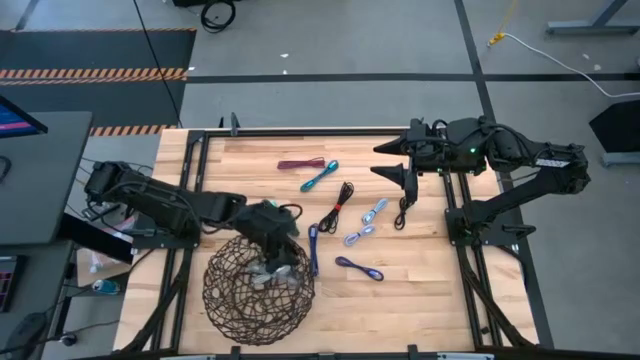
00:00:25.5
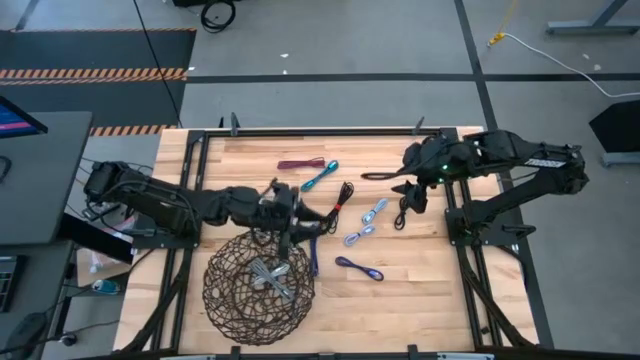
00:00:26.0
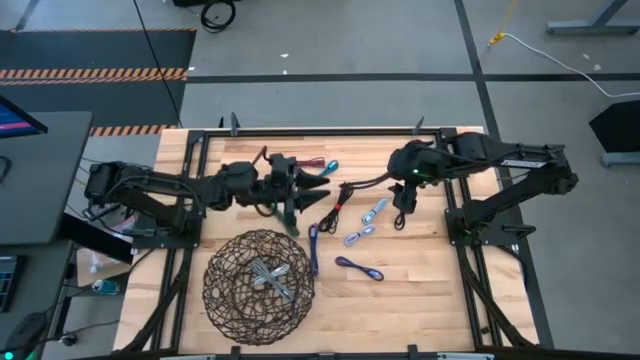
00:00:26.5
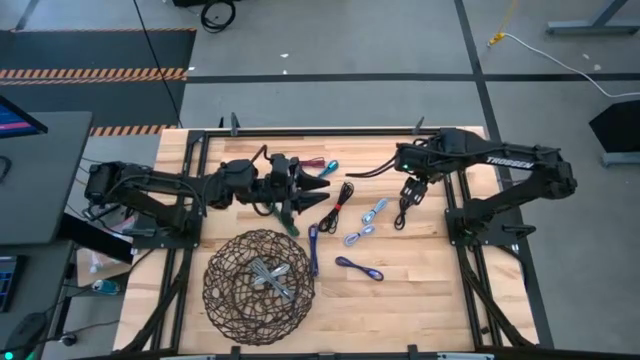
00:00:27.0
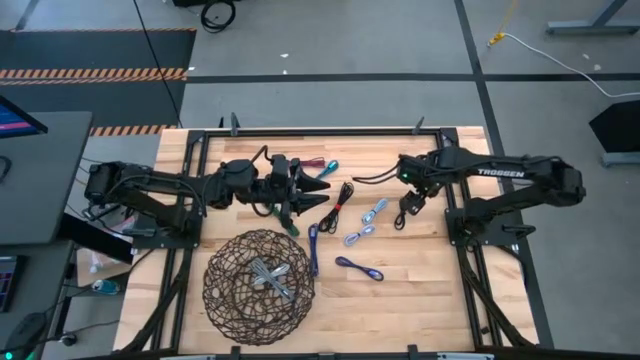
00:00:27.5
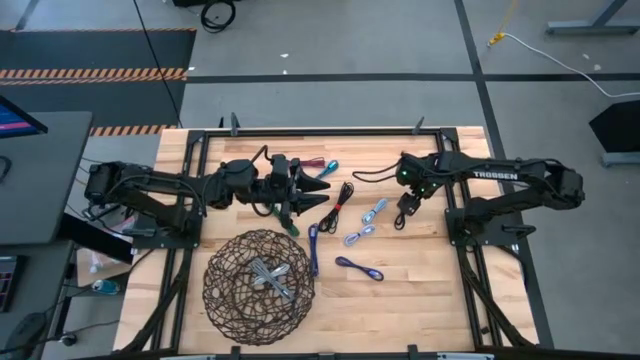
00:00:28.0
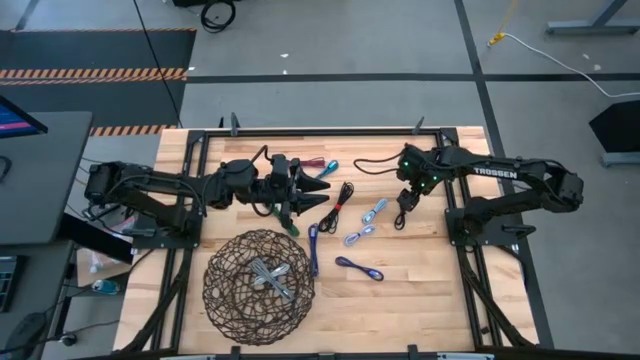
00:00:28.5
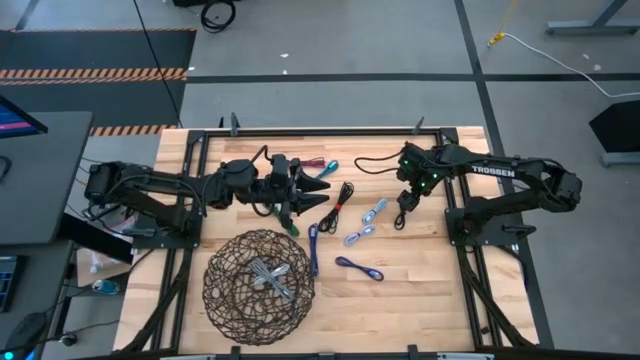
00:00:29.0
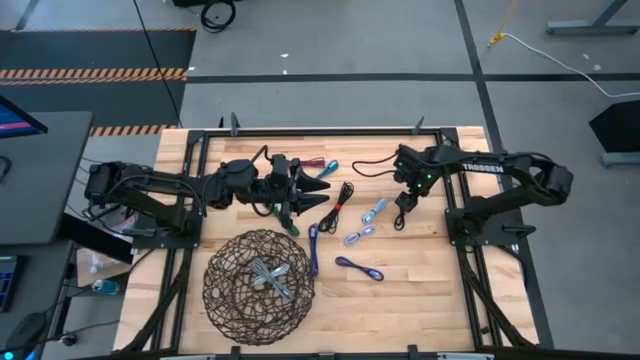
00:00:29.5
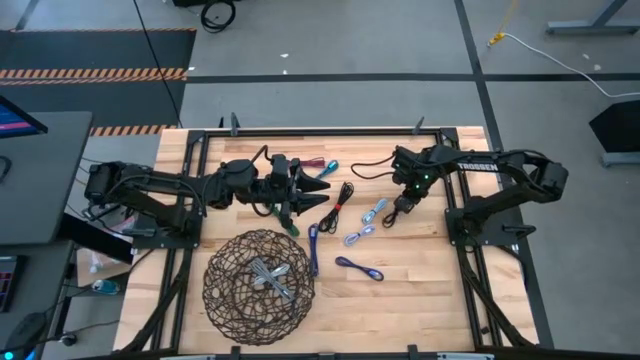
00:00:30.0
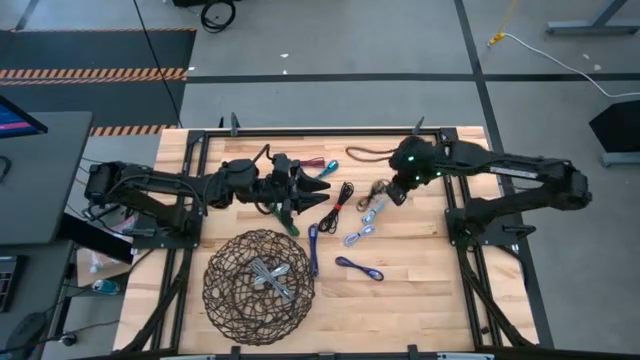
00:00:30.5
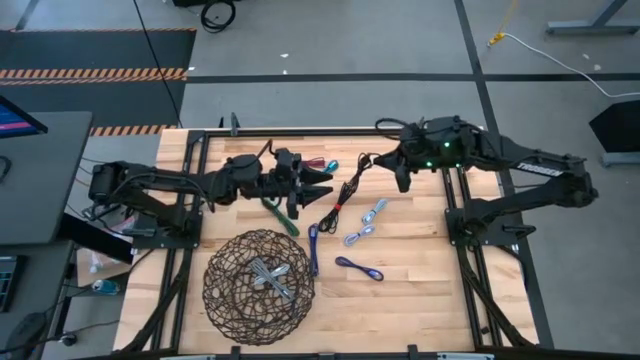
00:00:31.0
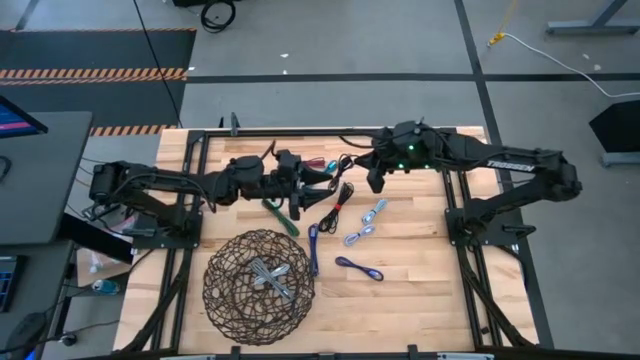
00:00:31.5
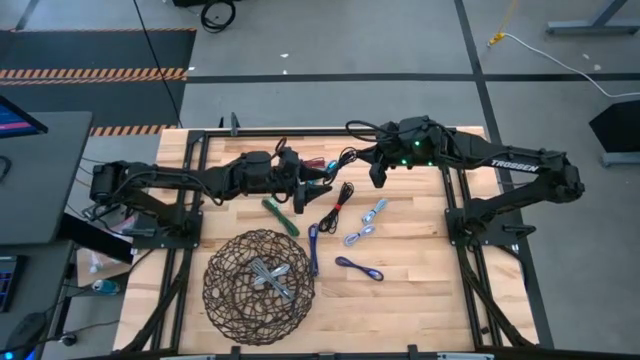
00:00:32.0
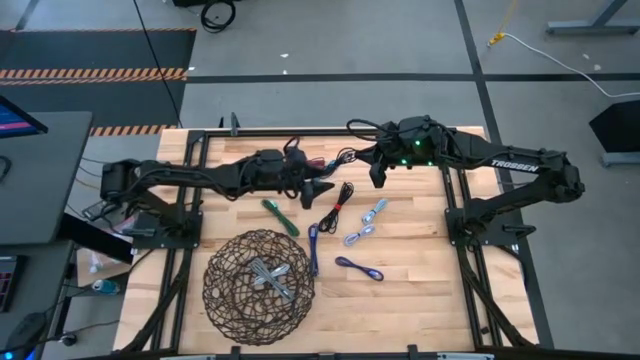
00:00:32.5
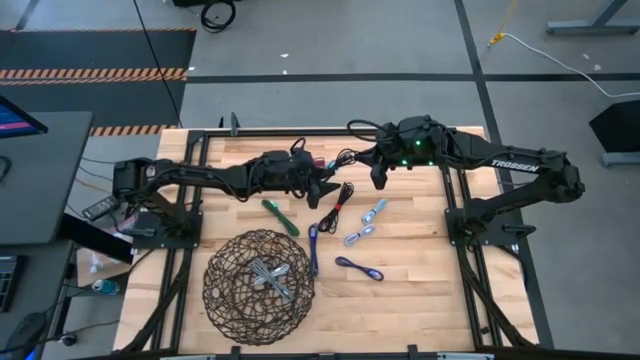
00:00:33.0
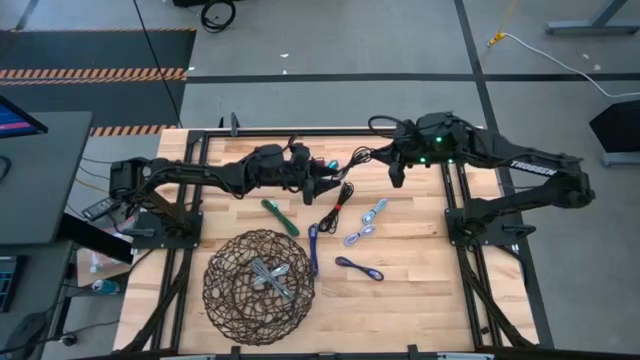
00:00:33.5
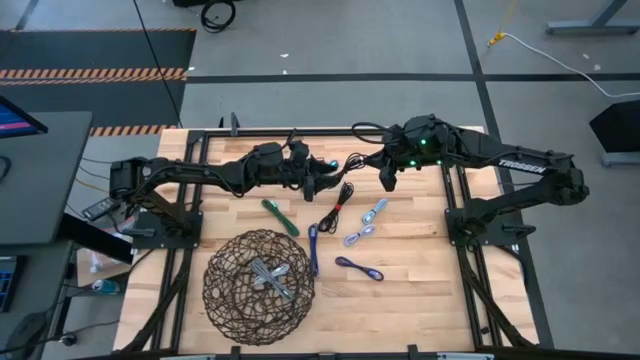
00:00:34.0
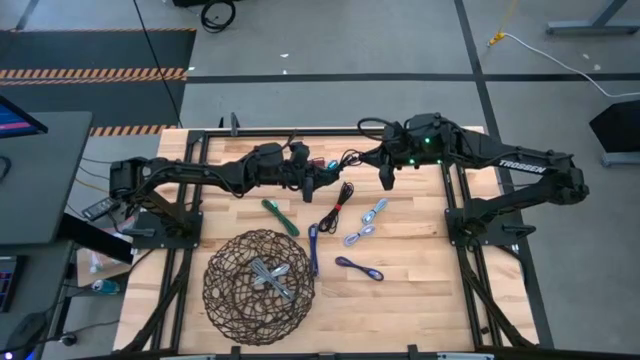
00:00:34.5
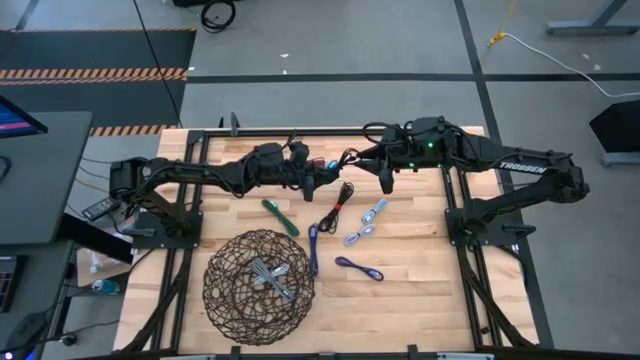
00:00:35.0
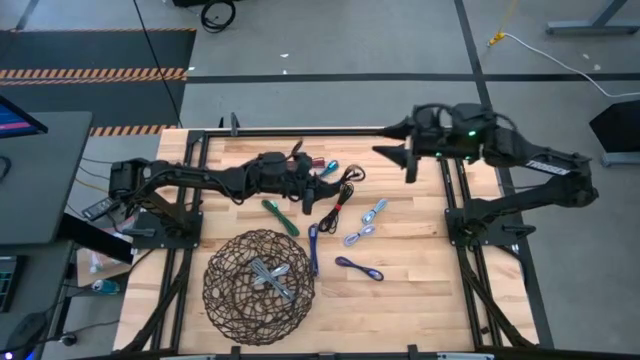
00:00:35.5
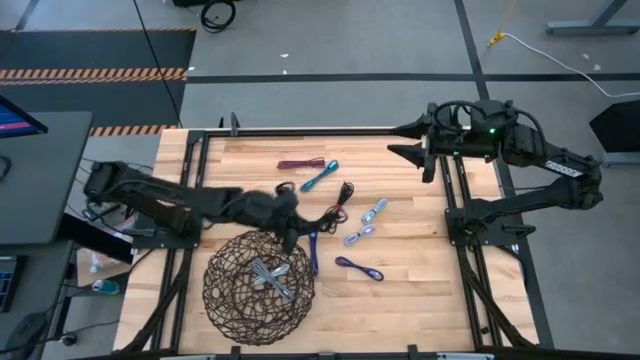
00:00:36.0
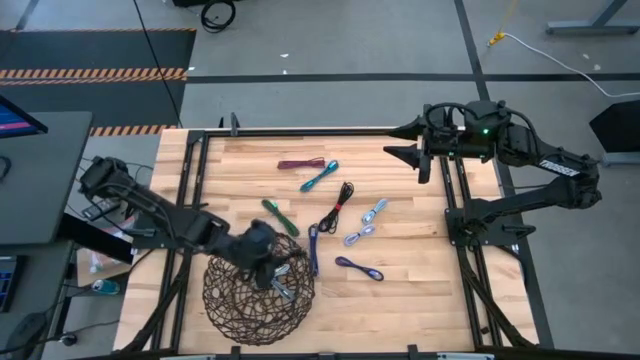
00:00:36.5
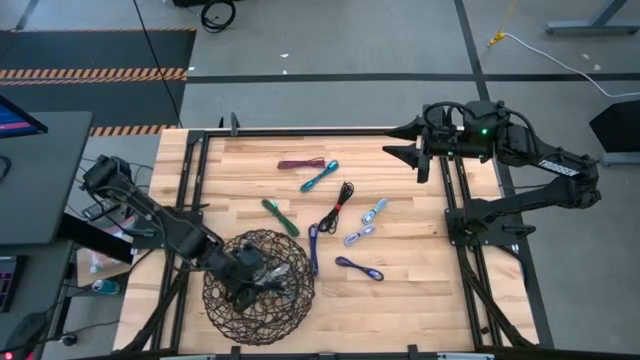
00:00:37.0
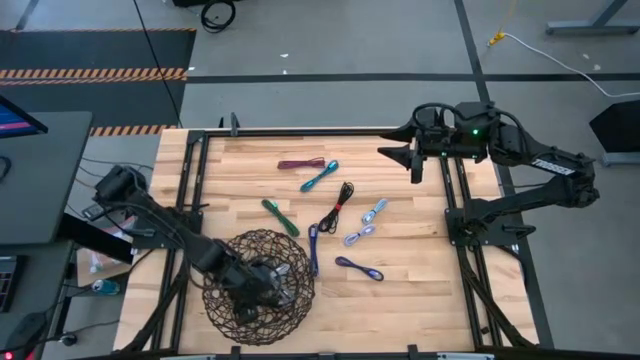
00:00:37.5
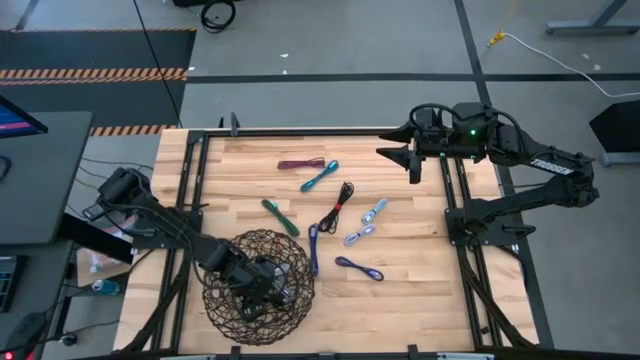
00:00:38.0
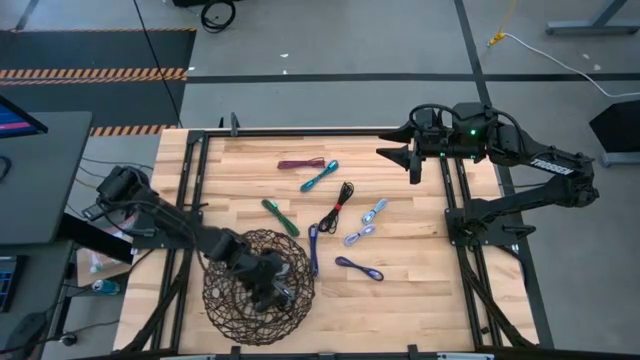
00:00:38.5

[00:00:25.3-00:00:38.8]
Task: Pick and place USB-C Cables
Put the right black charger cable into the wire basket

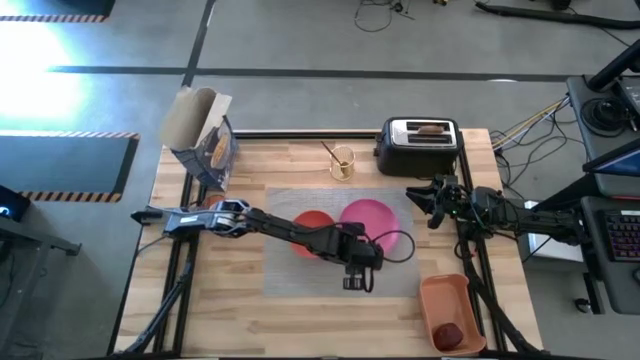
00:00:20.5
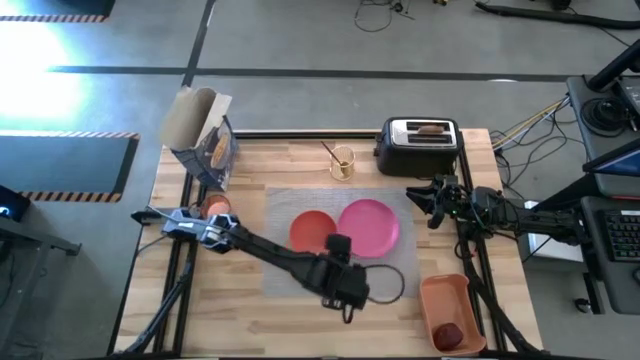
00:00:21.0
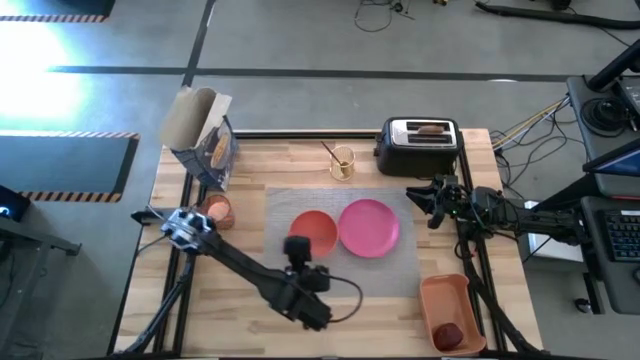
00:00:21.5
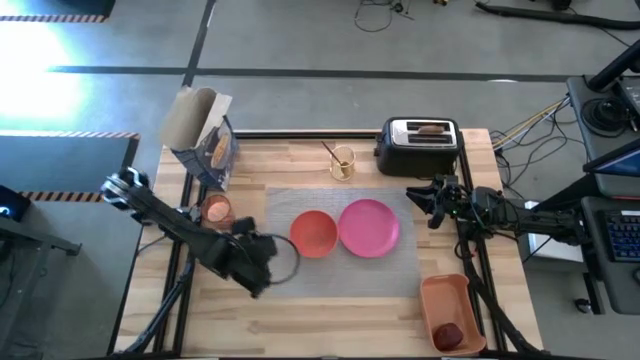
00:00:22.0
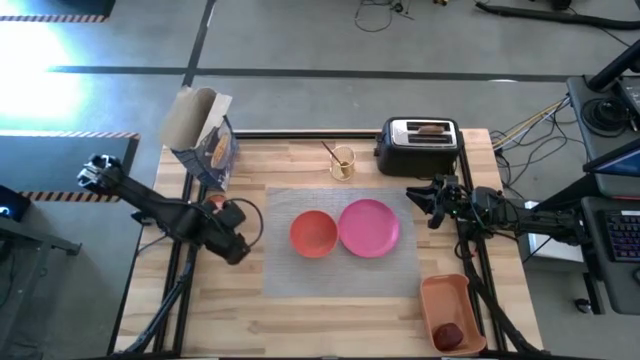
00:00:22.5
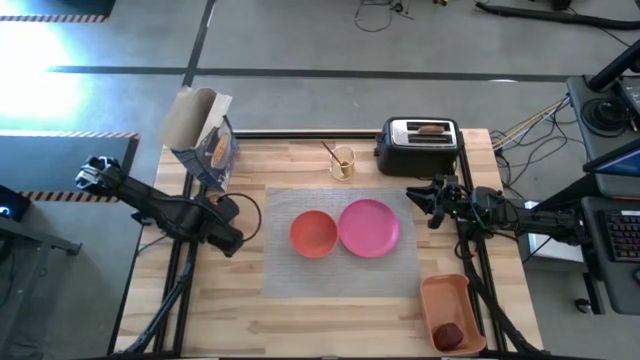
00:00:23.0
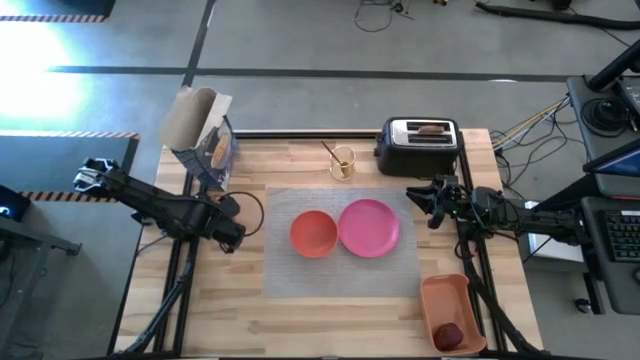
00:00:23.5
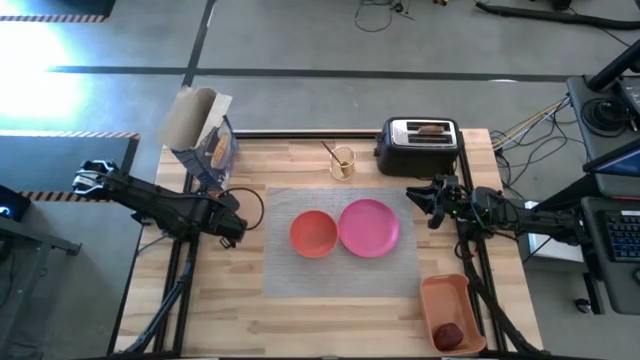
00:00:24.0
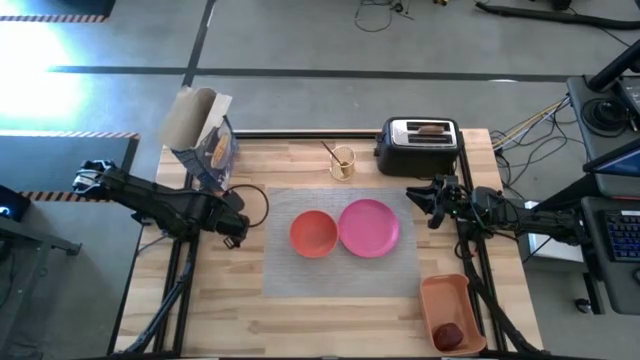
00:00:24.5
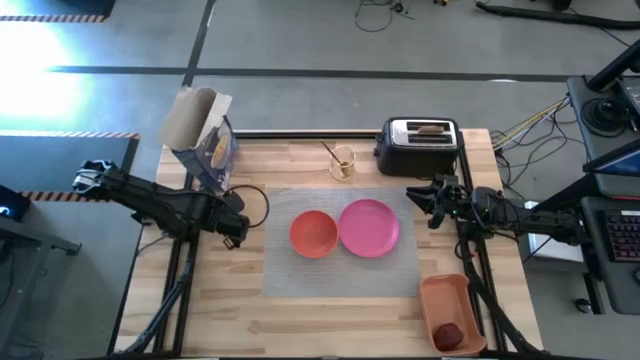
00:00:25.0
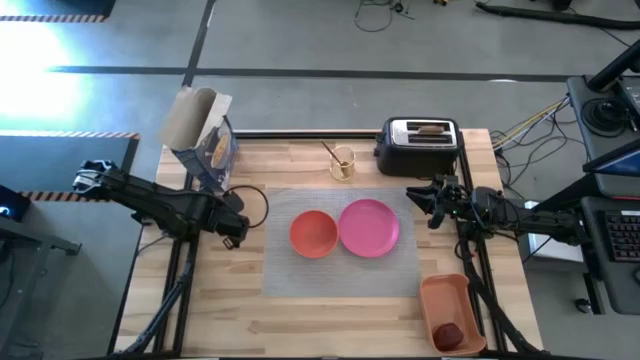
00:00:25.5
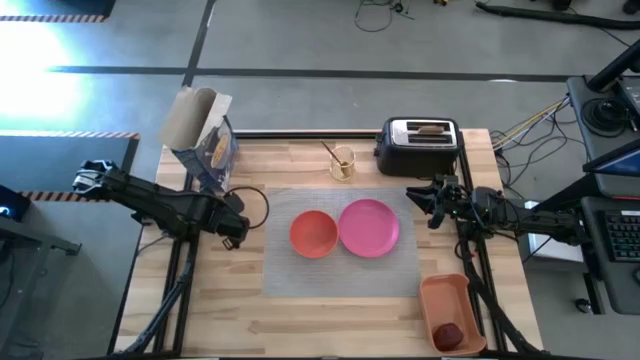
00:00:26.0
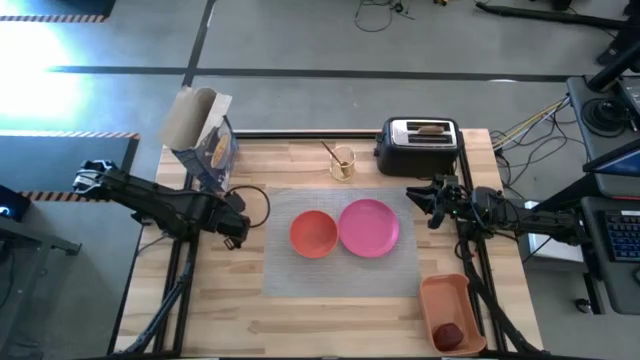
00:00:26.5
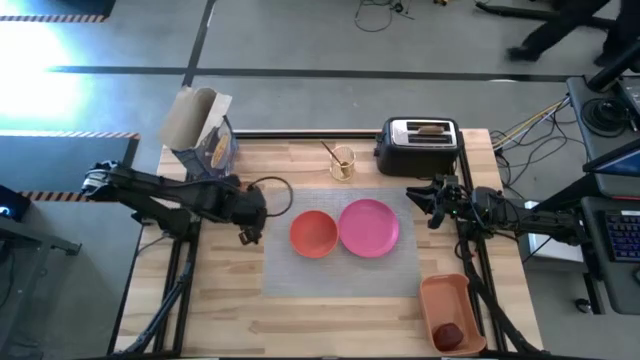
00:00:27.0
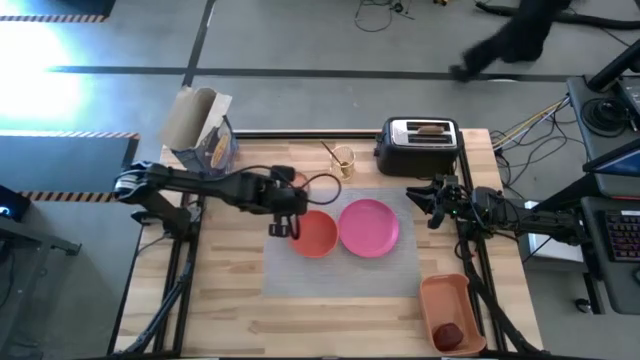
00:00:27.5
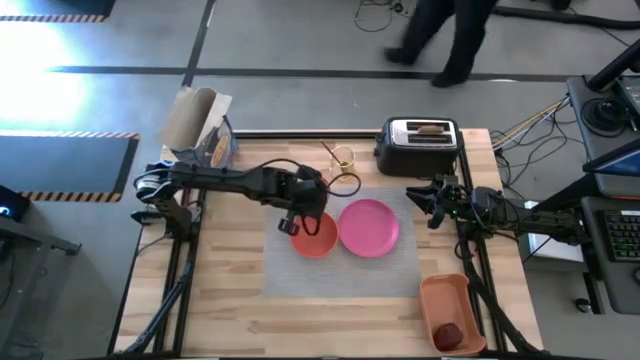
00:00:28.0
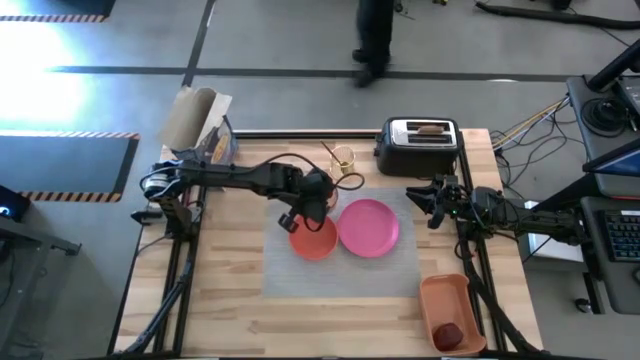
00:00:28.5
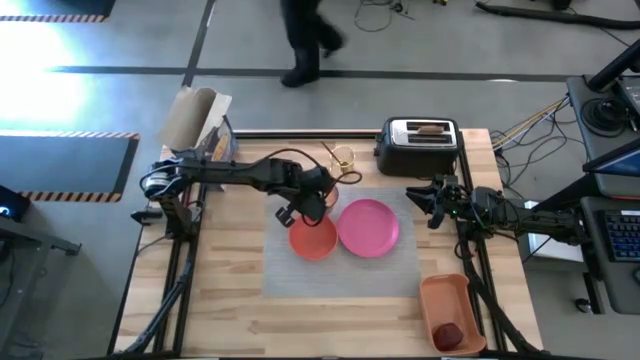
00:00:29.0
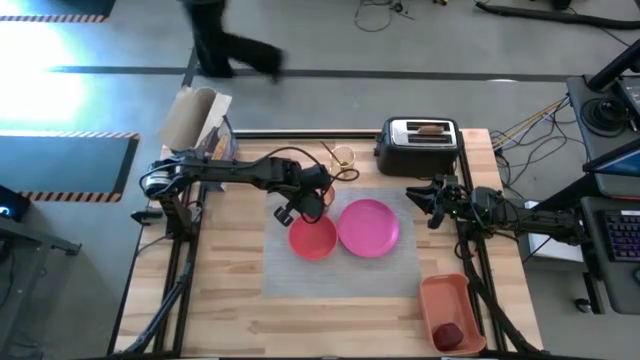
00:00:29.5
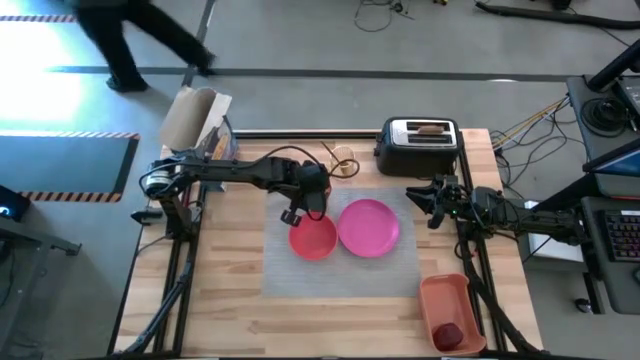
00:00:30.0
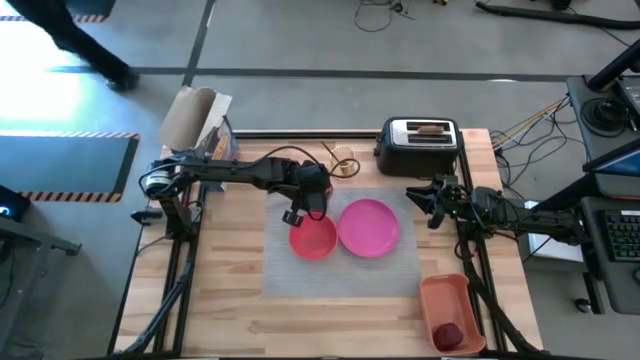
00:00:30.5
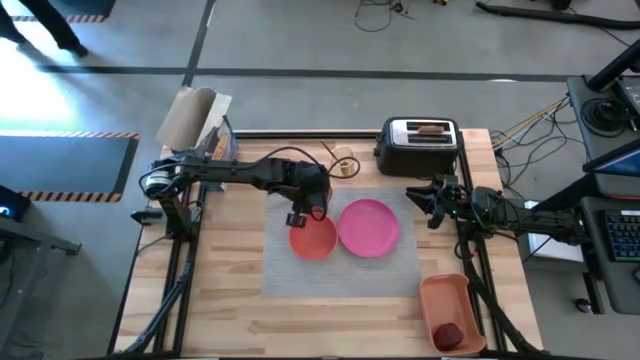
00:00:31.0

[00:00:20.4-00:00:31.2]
Task: Arrange a breakfast setting
Put the cup with milk on the gray tablemat to the top of the orange bowl
